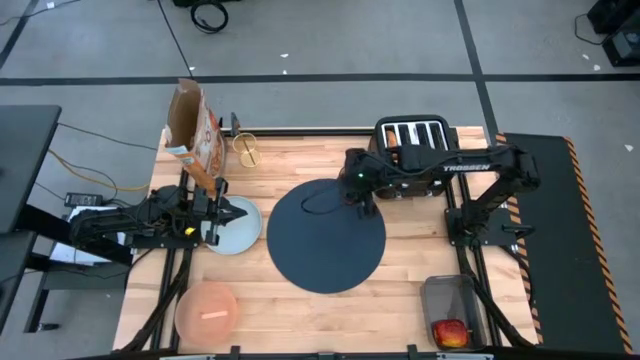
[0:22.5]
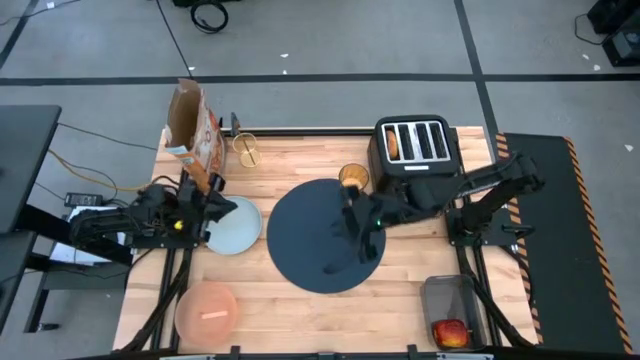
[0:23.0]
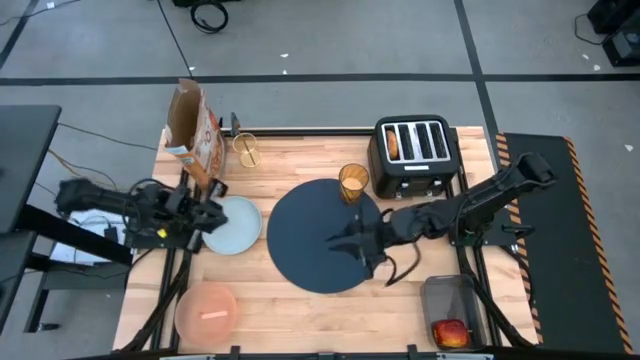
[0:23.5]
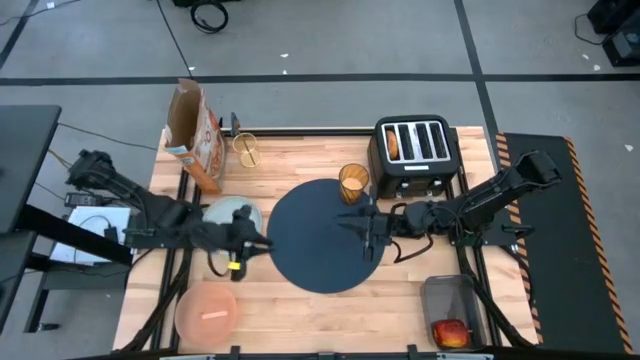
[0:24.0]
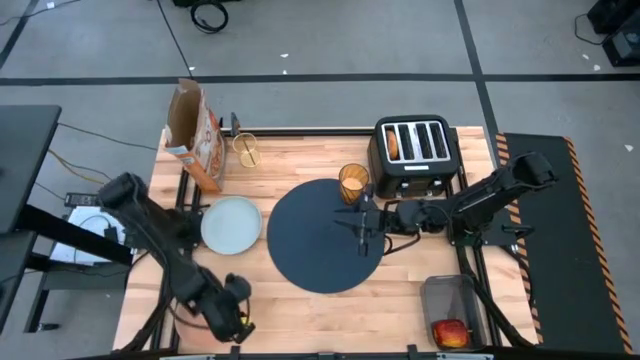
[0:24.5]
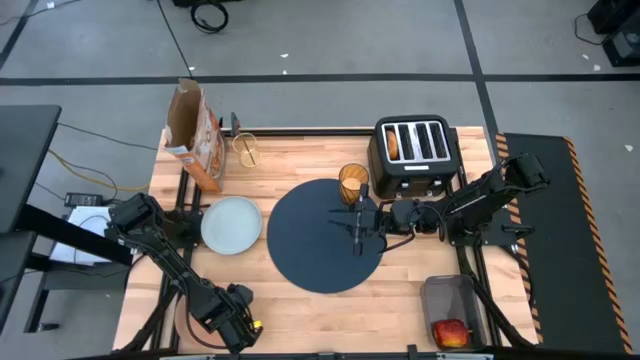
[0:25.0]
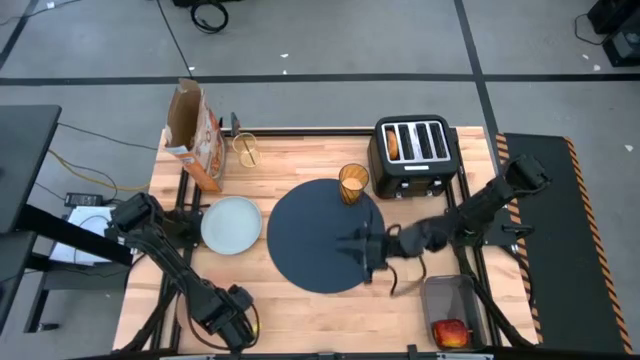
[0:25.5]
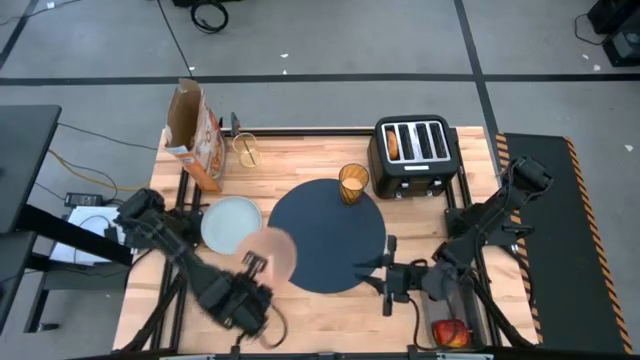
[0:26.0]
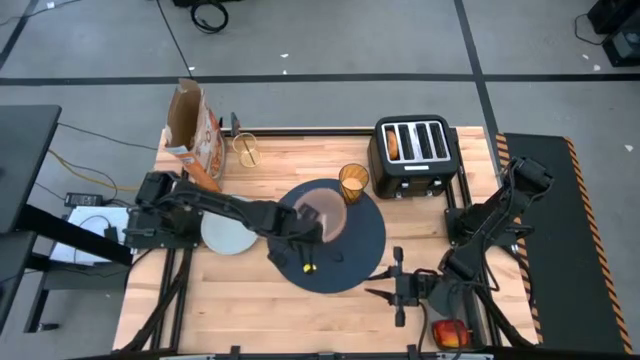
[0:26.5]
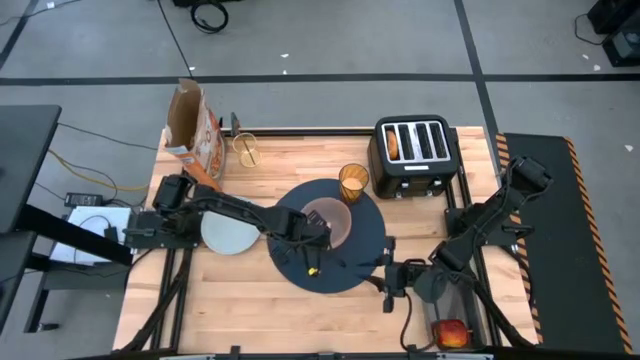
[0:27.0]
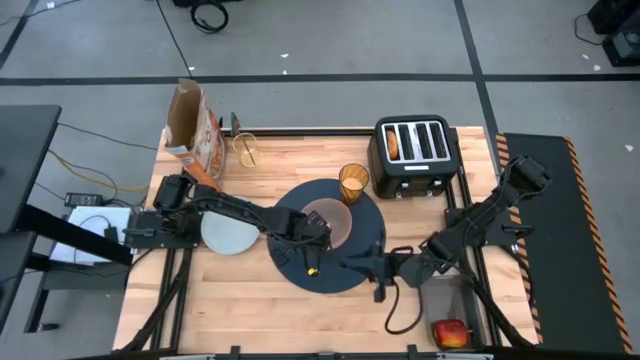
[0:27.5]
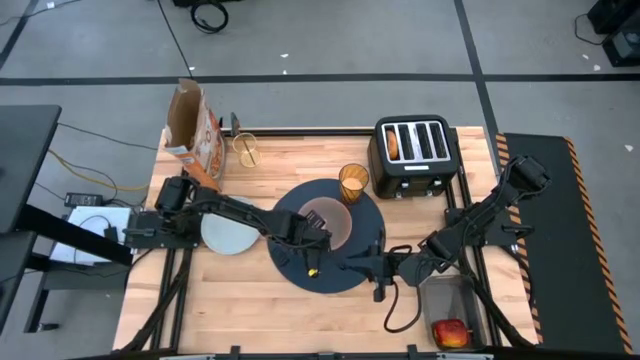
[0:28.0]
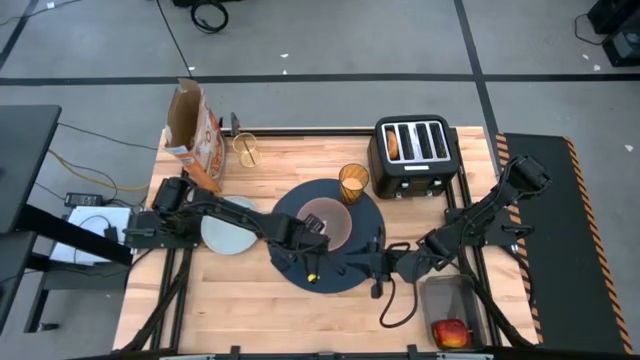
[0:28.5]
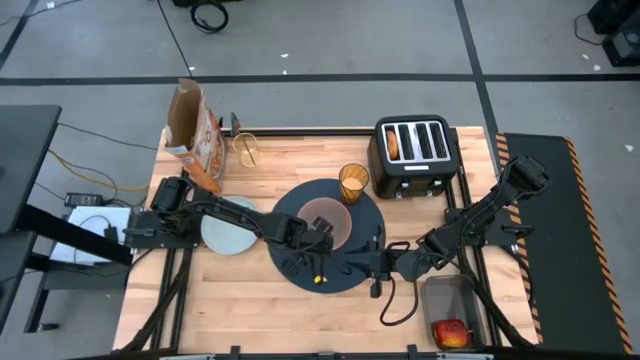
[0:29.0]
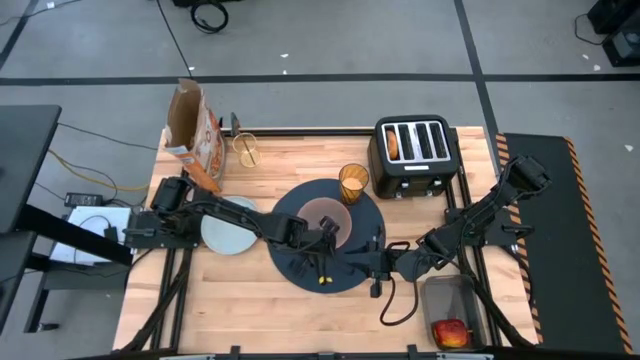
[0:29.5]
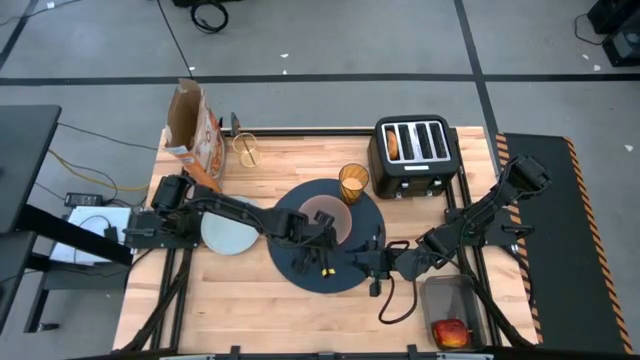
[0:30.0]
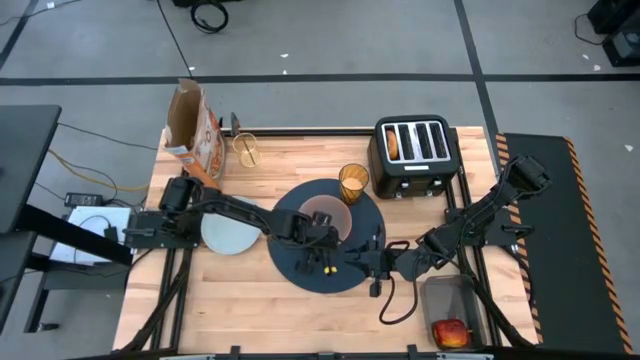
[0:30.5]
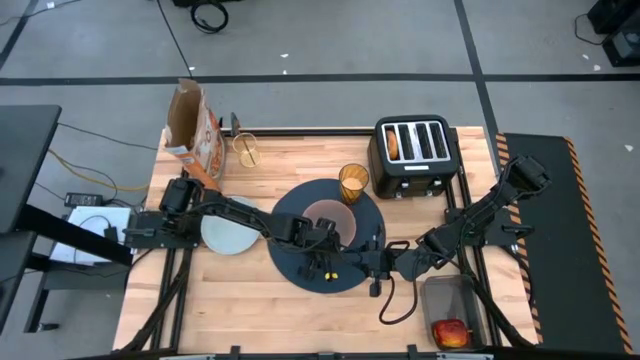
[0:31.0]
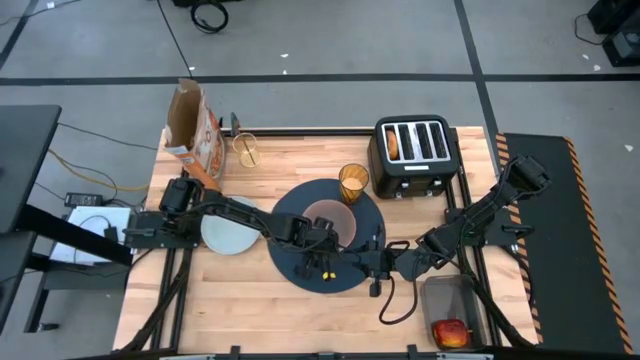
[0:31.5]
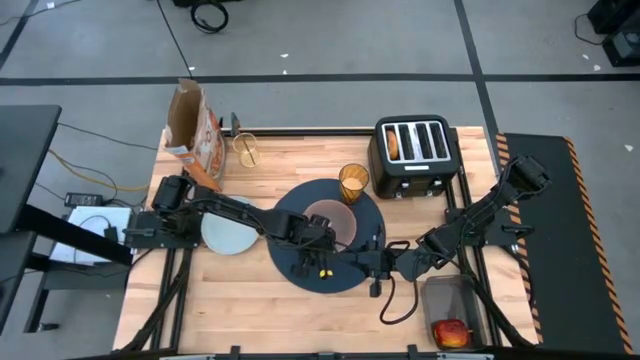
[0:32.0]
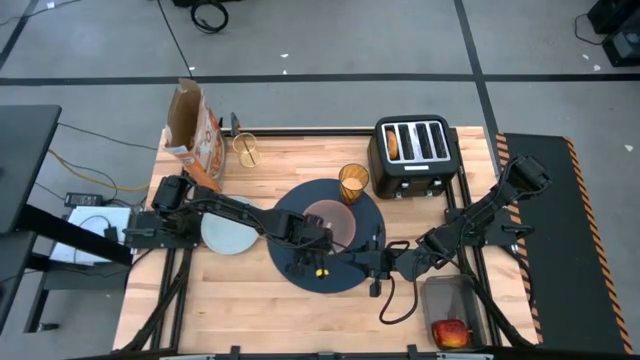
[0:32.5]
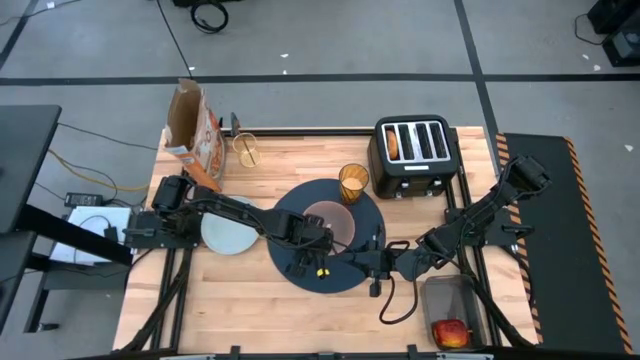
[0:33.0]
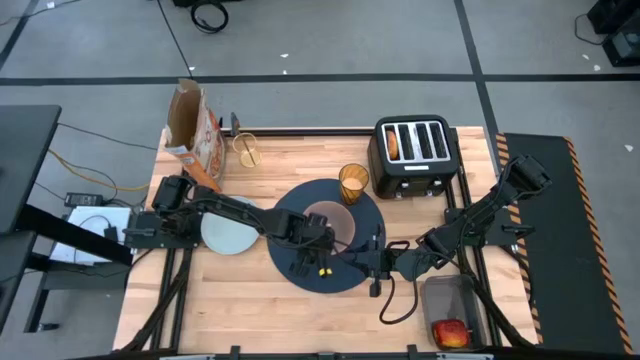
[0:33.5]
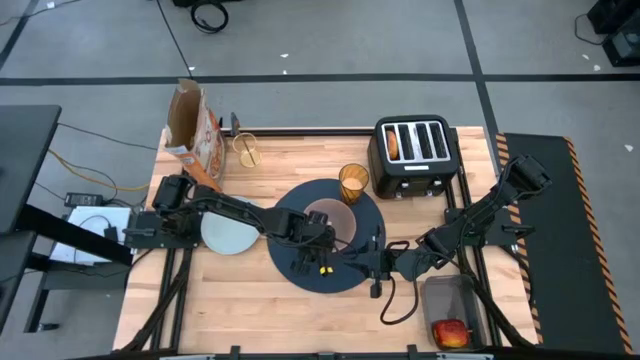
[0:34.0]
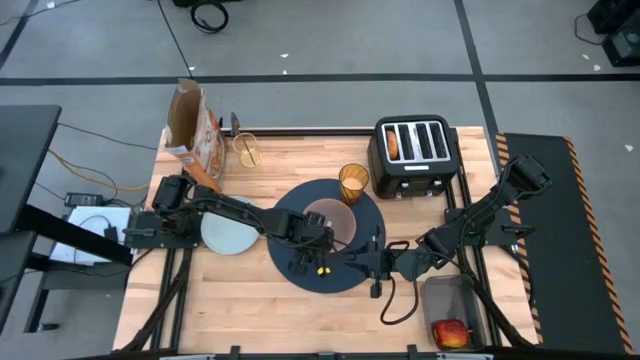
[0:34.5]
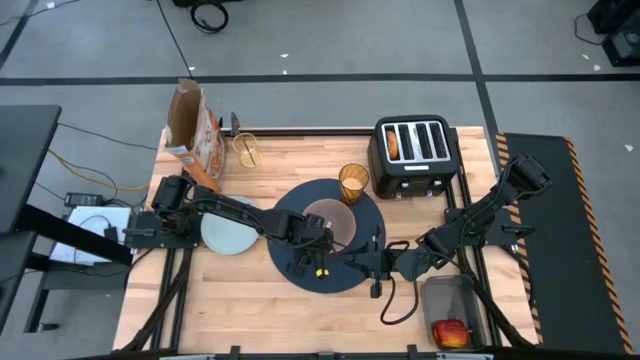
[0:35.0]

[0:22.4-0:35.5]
Task: Arrange a breakfast setting
Put the light orange bowl on the center of the blue table placemat

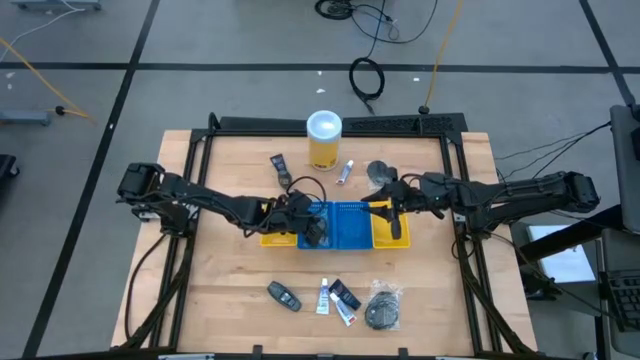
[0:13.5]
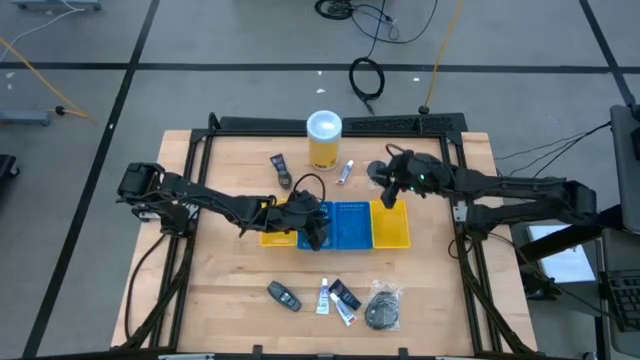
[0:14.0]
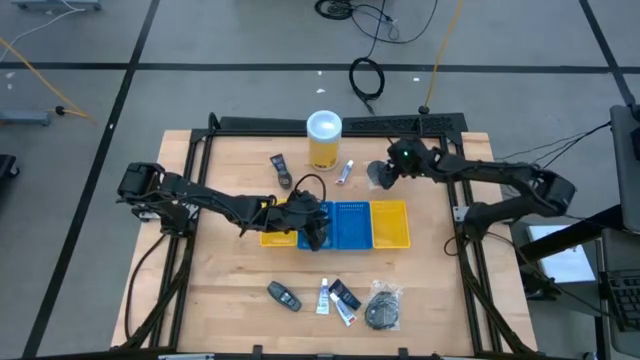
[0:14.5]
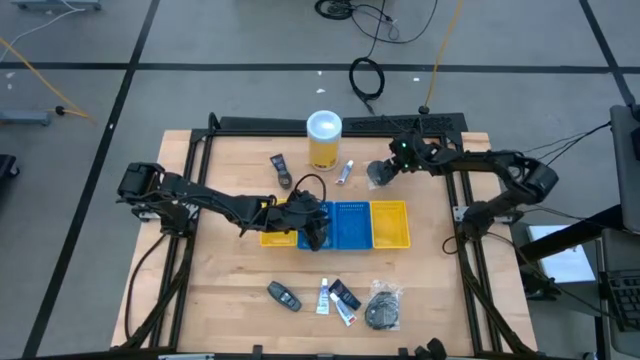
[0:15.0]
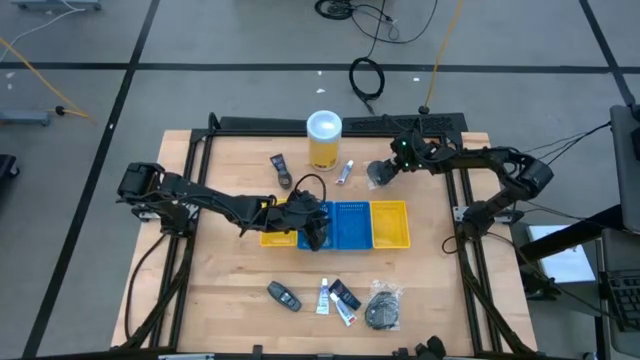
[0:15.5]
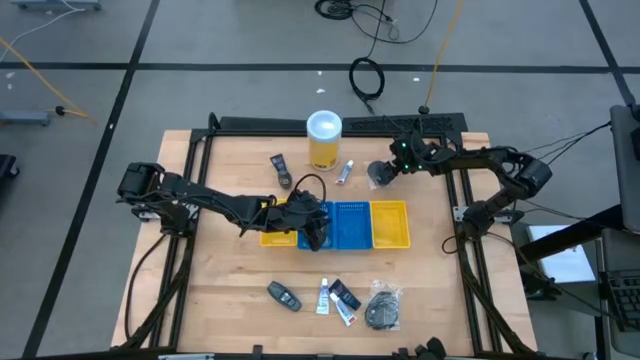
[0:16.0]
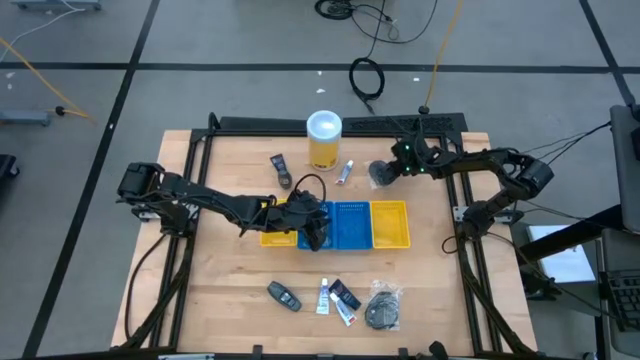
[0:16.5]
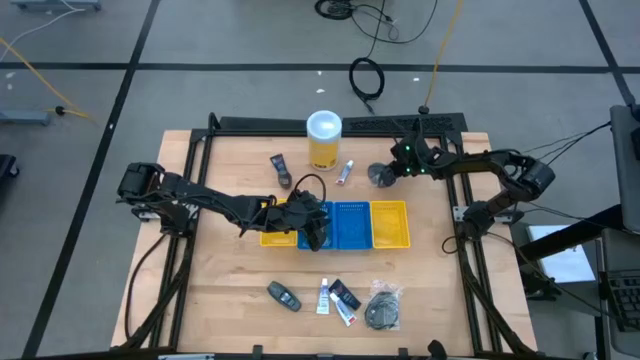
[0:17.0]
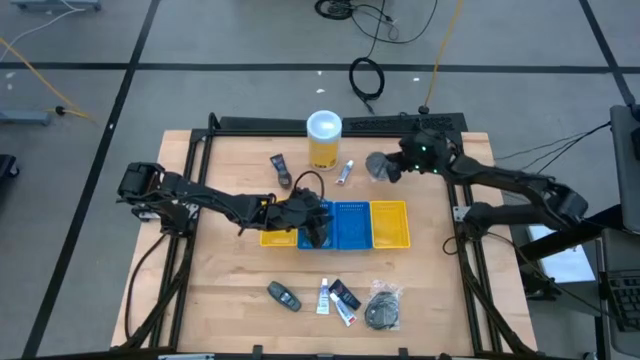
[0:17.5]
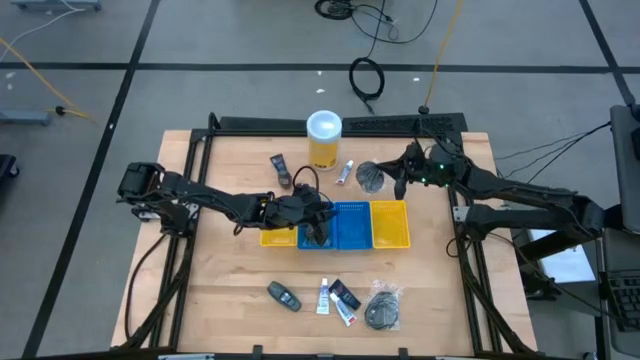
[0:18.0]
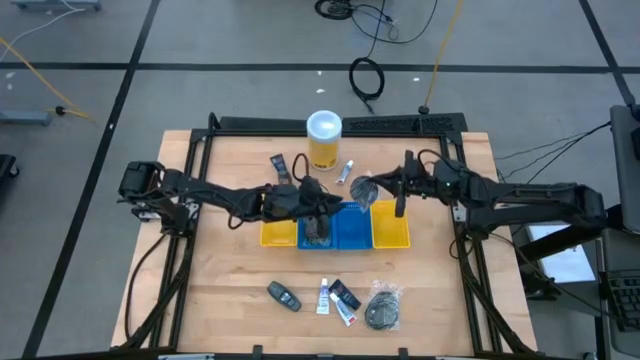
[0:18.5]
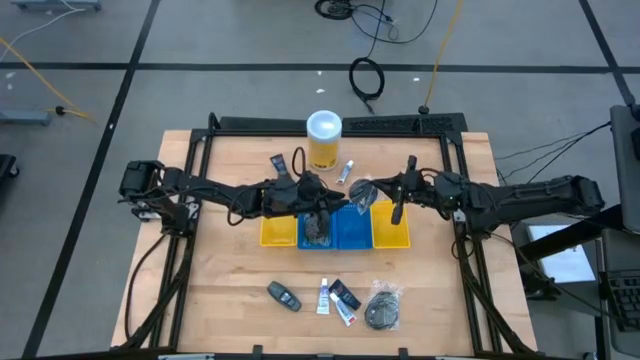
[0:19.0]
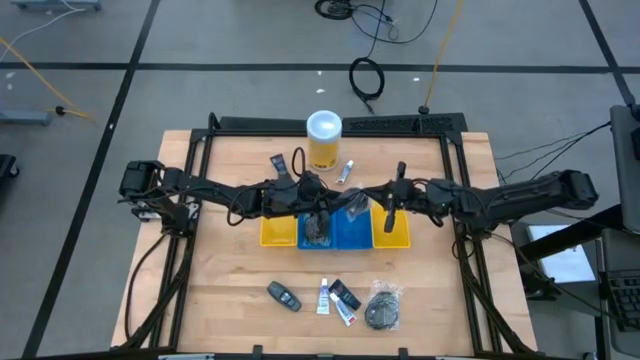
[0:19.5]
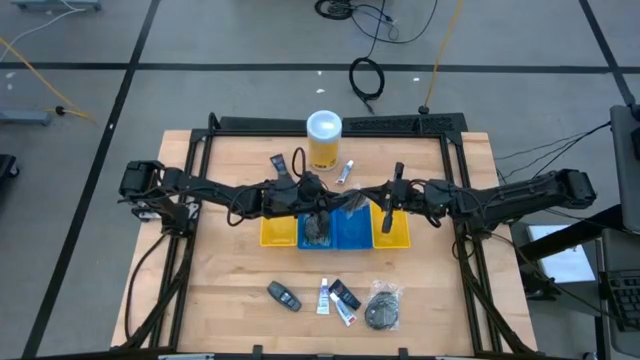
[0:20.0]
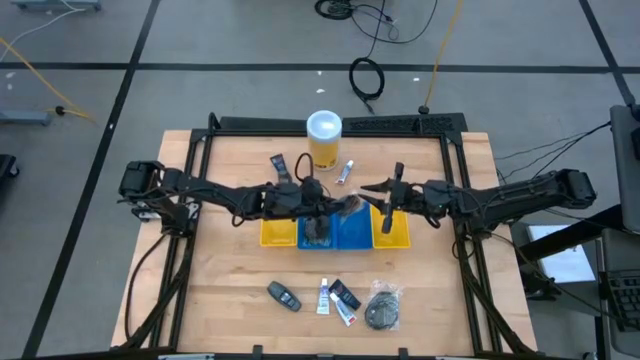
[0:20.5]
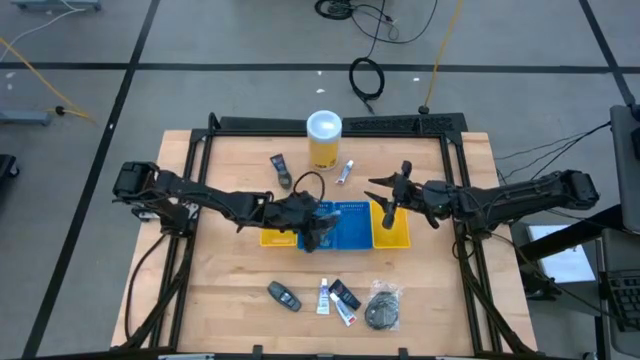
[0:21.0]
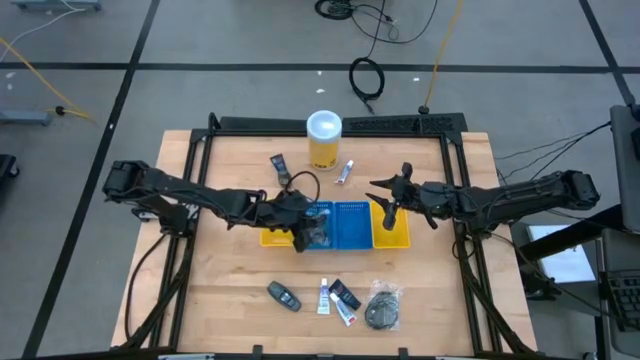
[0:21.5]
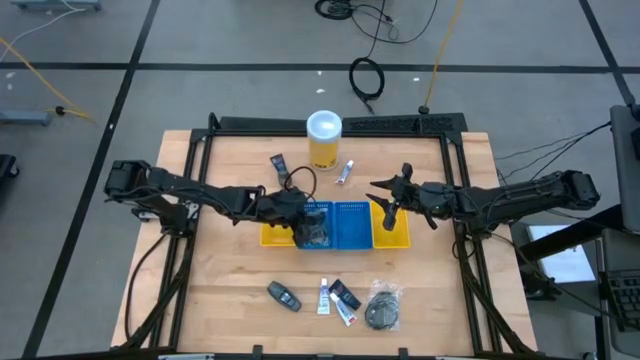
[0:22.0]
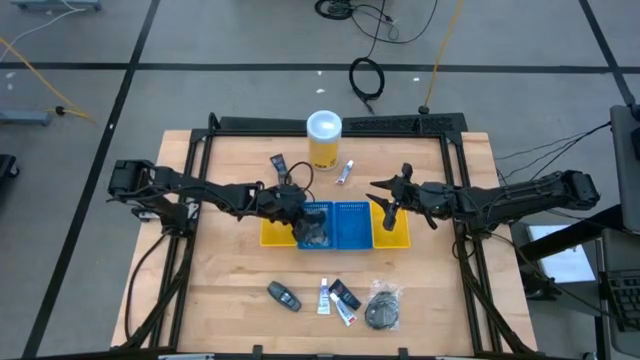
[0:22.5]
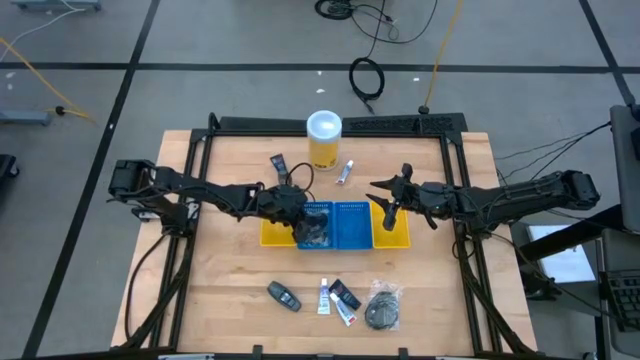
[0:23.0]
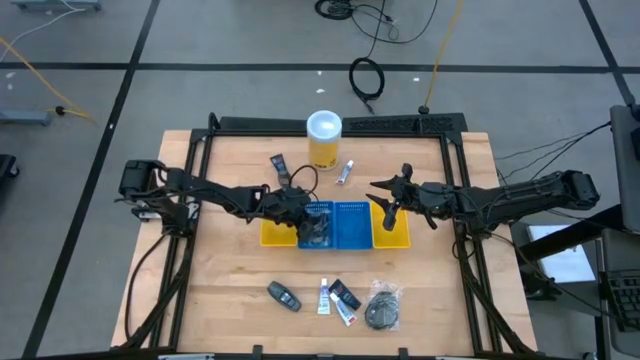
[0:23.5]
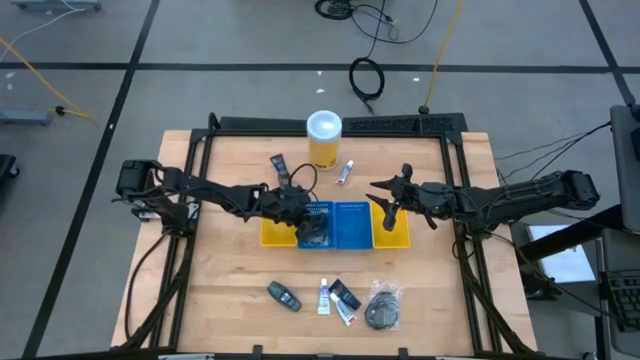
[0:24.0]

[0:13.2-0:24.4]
Task: Pick & Place Travel size toiletries
Put the black comb into the left blue bin
